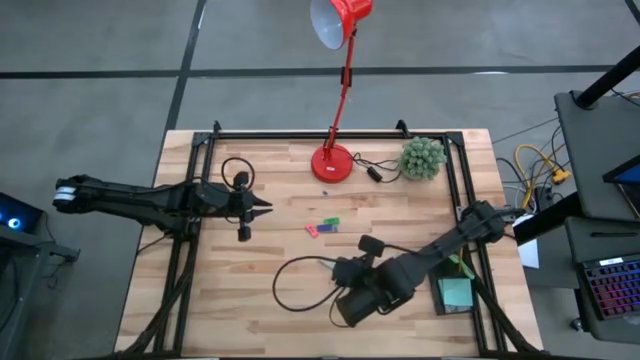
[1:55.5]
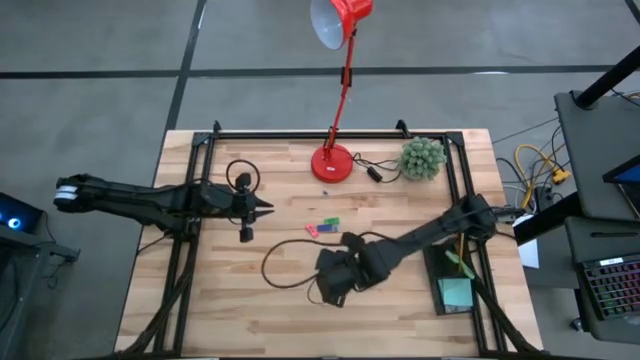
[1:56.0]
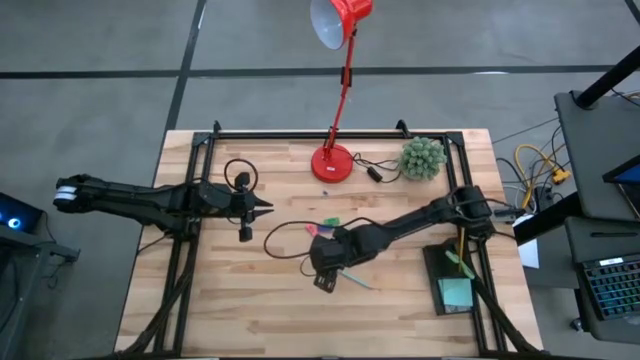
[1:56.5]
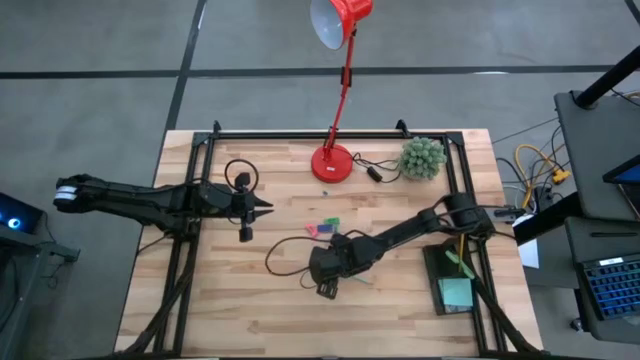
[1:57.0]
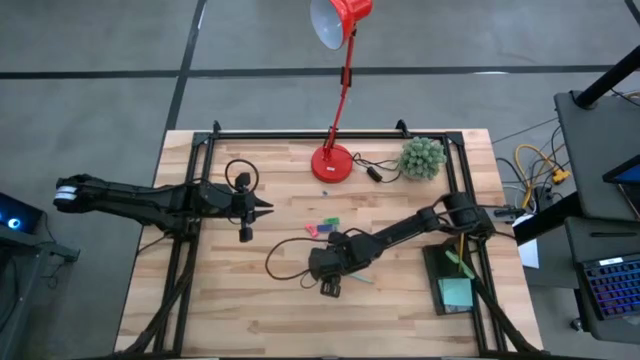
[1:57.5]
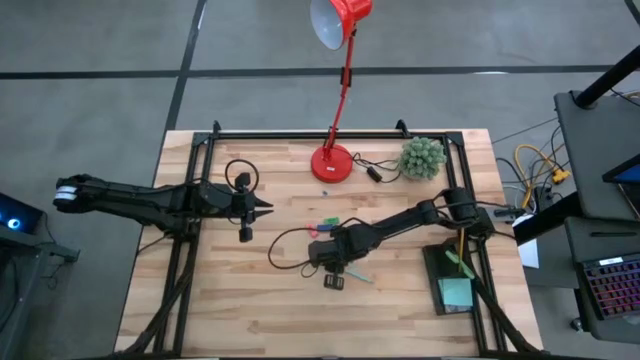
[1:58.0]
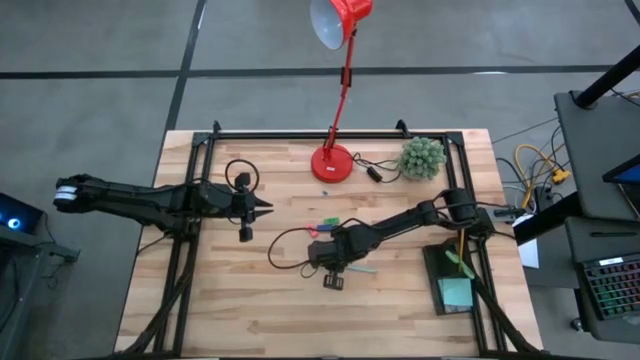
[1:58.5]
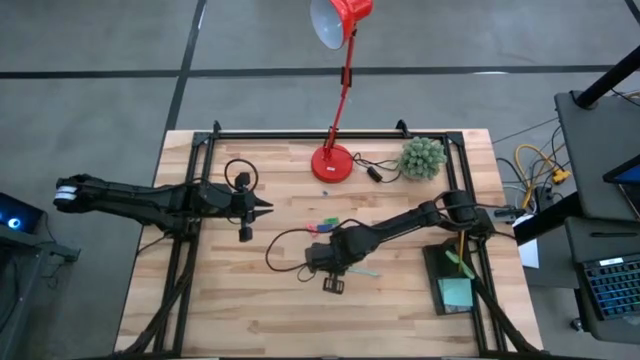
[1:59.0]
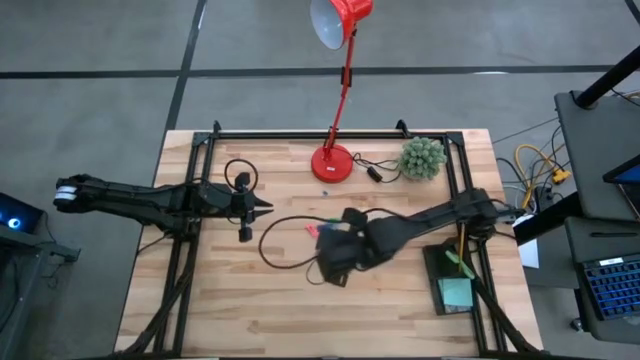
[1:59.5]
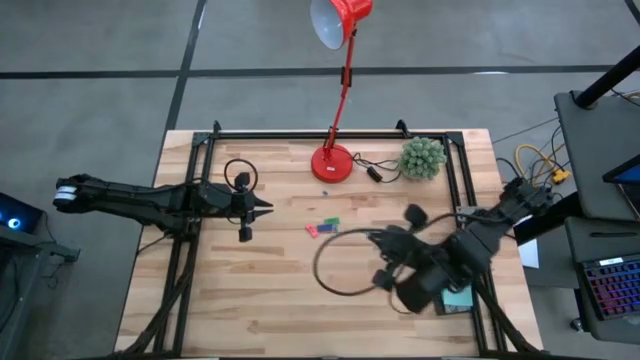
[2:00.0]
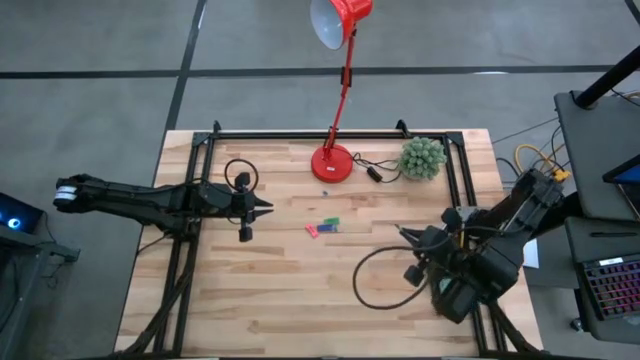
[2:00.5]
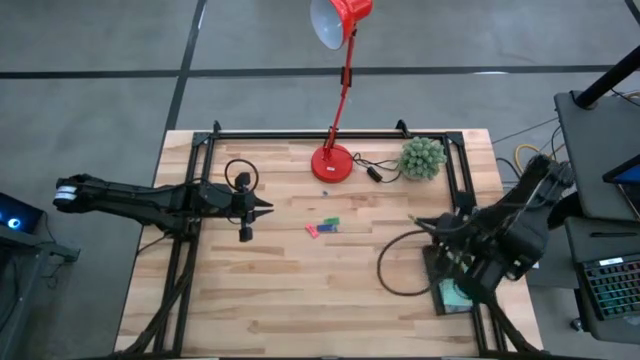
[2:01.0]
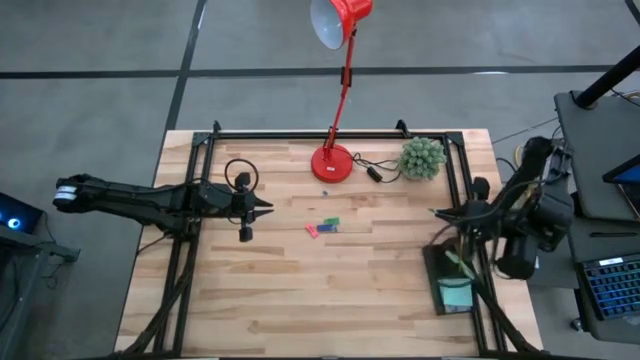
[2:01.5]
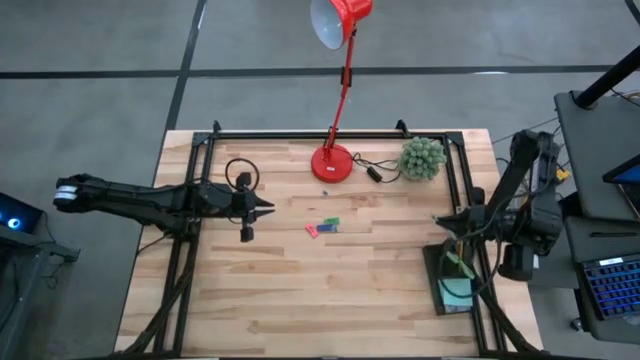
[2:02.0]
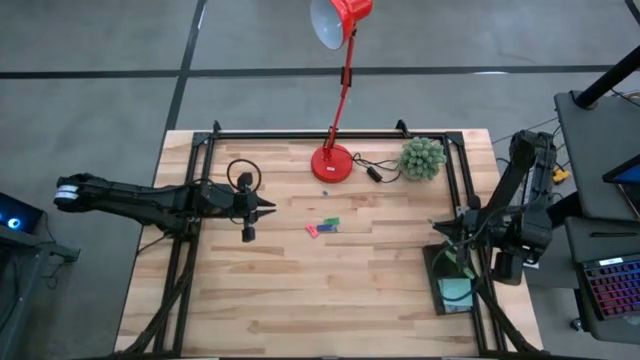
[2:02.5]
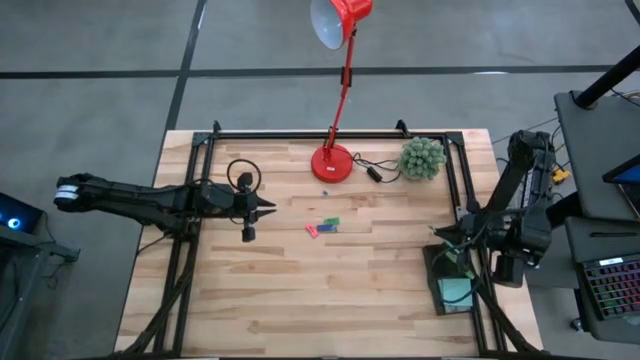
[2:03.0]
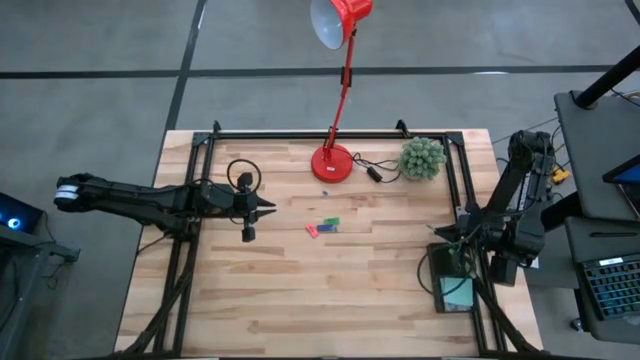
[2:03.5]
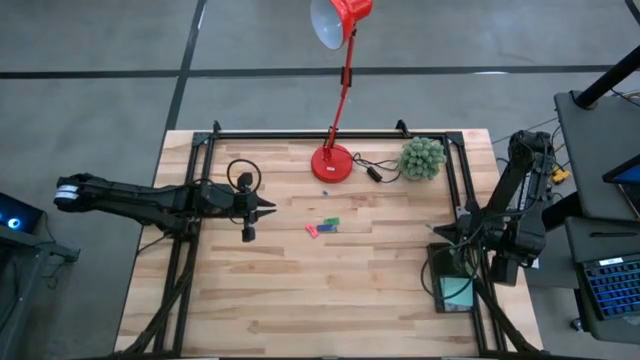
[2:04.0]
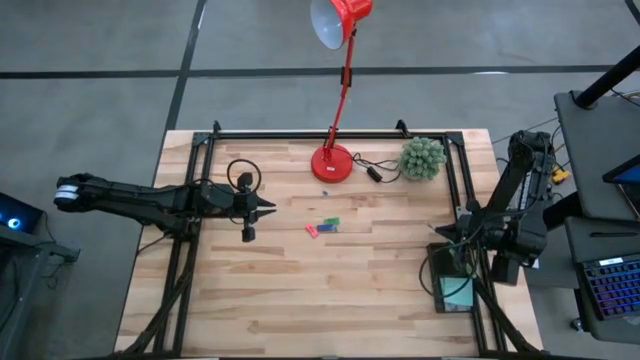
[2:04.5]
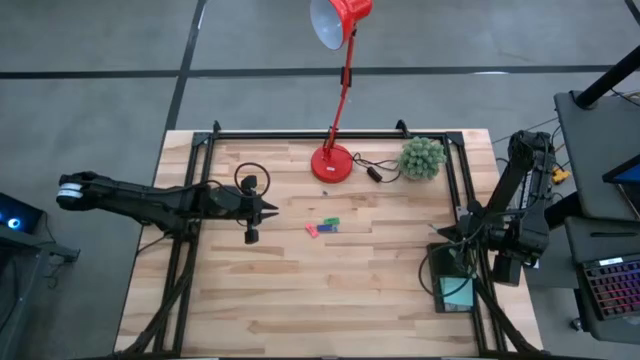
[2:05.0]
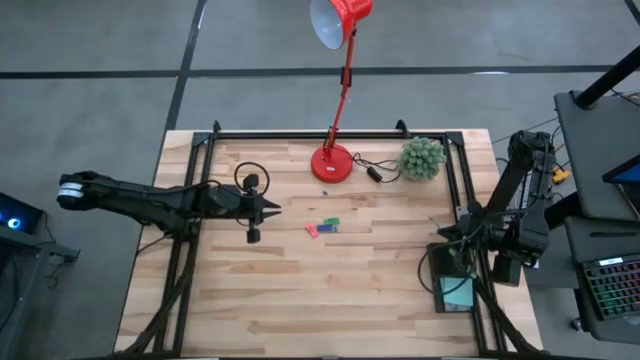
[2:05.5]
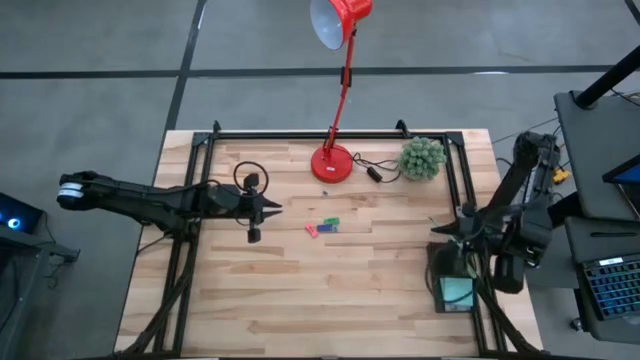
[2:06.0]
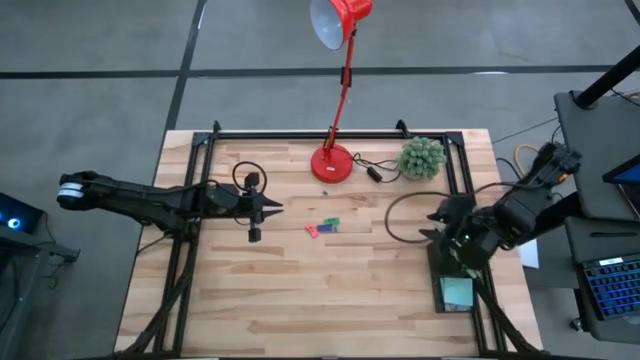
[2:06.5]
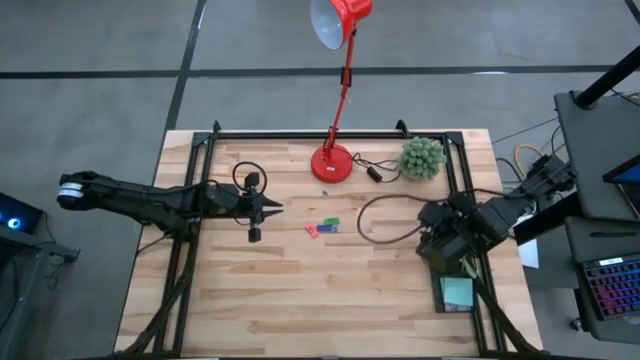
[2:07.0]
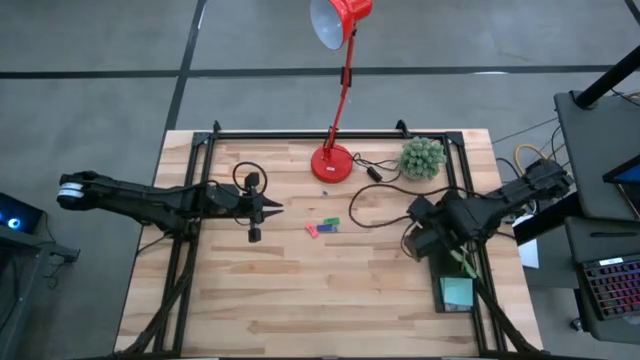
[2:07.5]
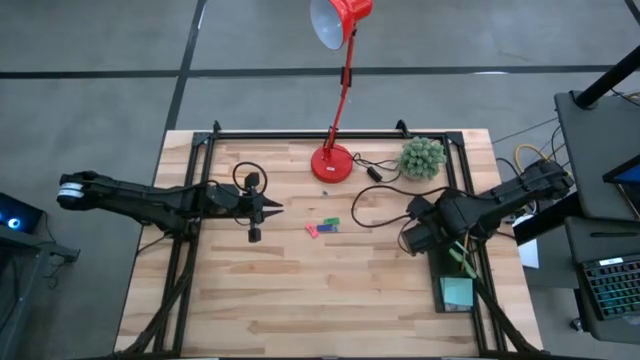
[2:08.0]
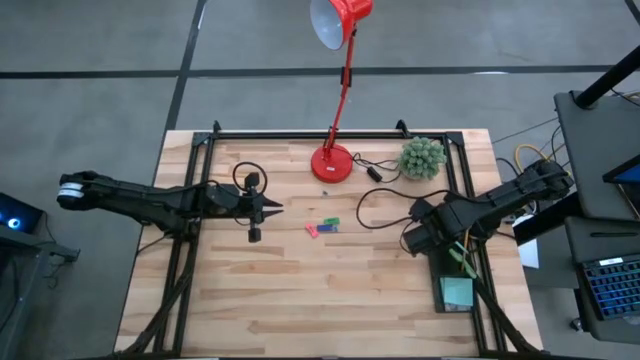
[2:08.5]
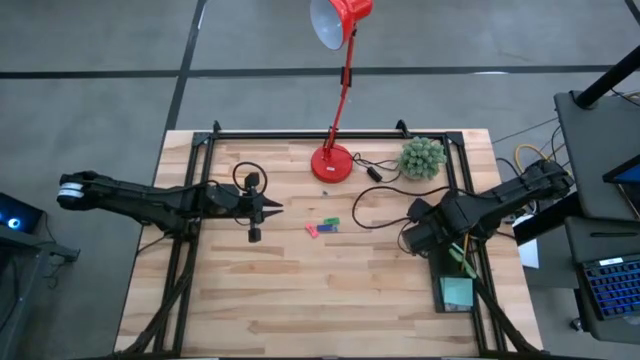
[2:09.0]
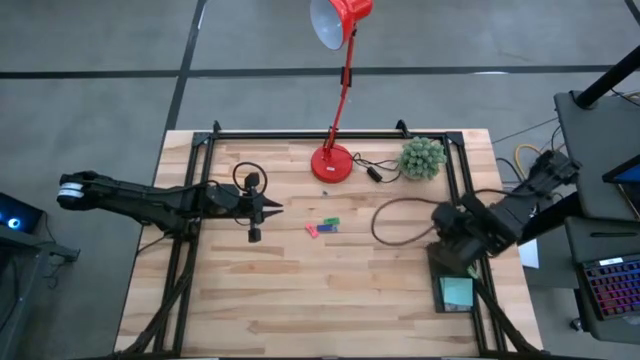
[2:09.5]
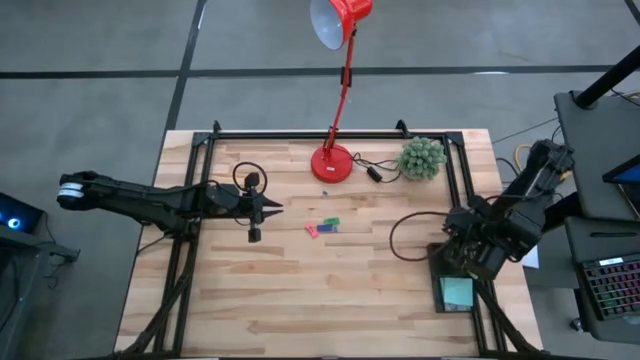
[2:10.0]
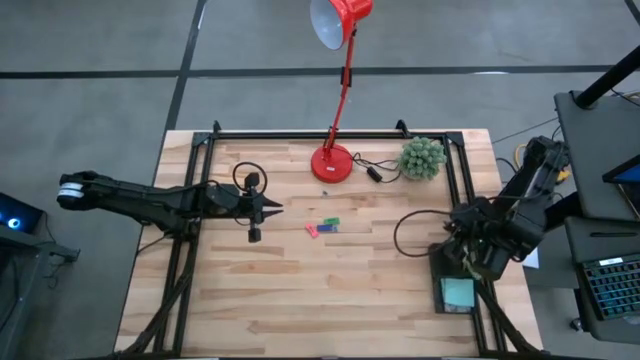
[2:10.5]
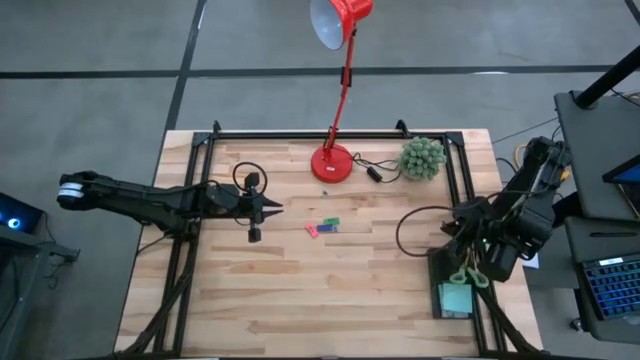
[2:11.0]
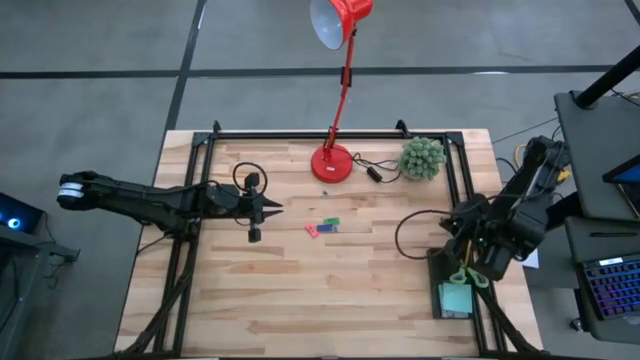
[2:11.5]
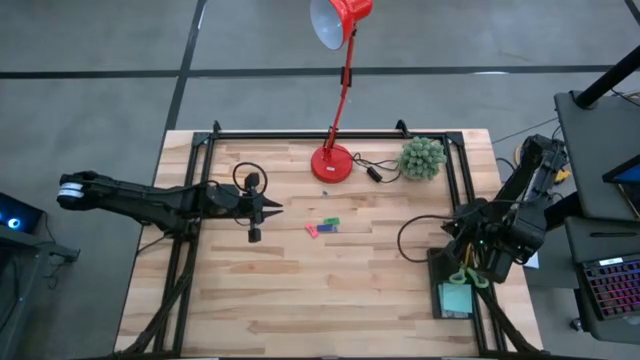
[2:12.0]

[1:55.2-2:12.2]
Task: Pick and place office supplies into organizer
Put the blue pencil into the black desk organizer

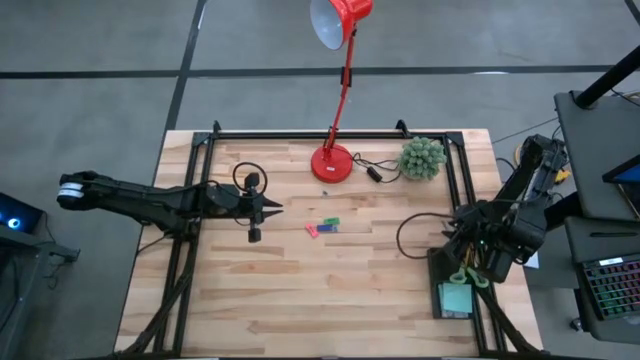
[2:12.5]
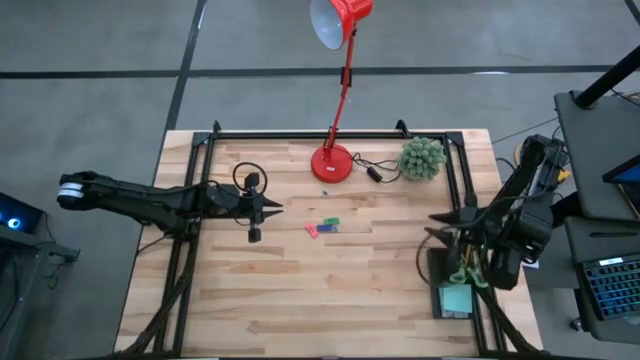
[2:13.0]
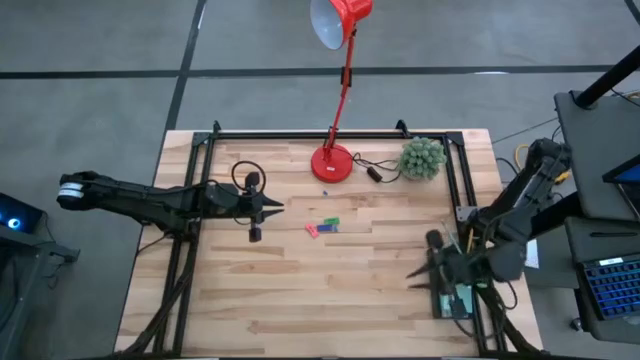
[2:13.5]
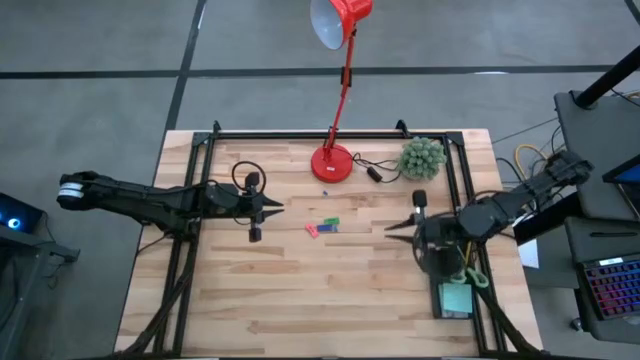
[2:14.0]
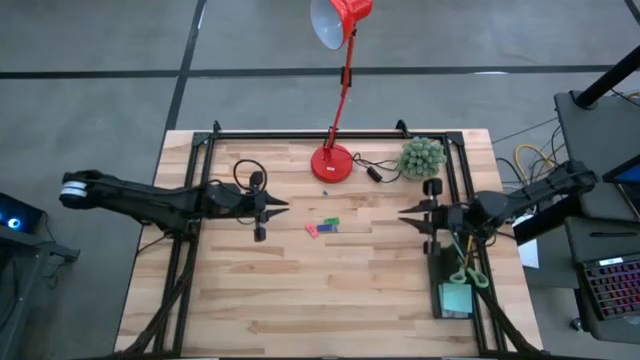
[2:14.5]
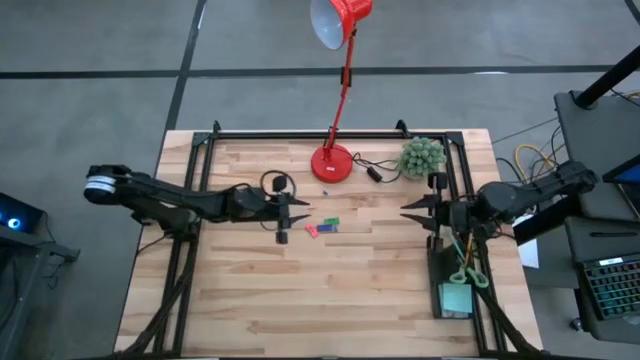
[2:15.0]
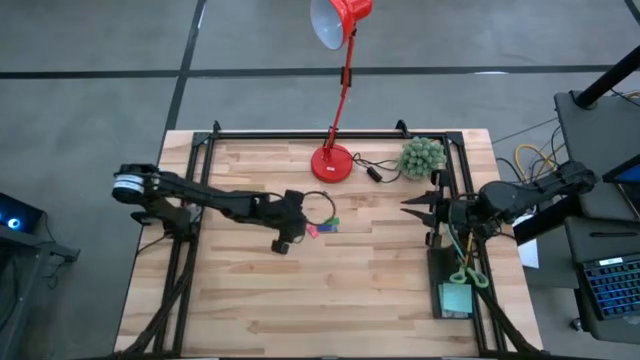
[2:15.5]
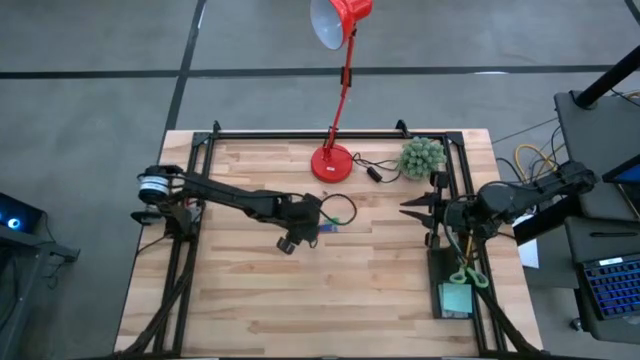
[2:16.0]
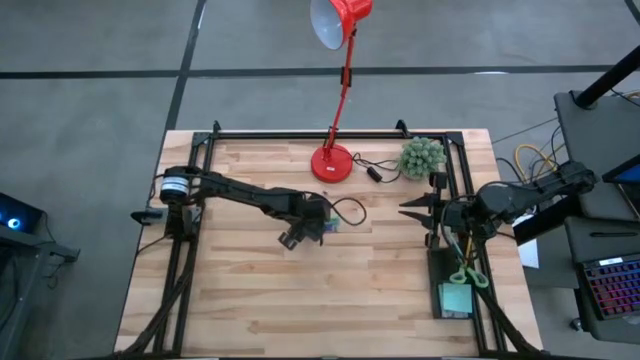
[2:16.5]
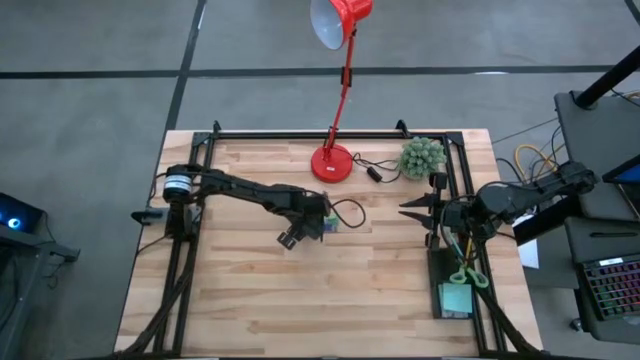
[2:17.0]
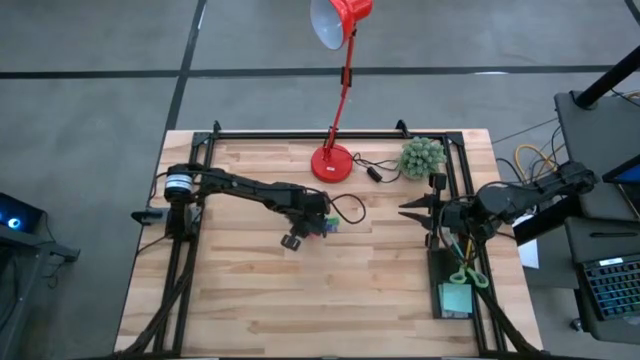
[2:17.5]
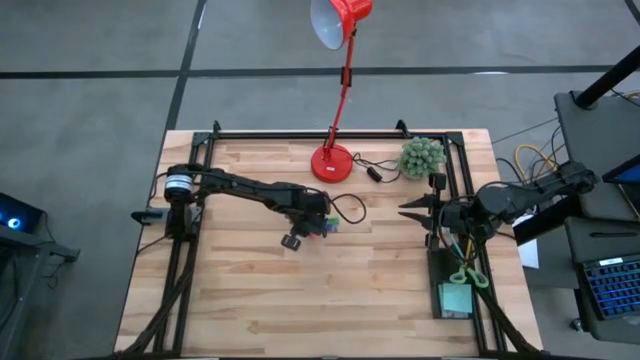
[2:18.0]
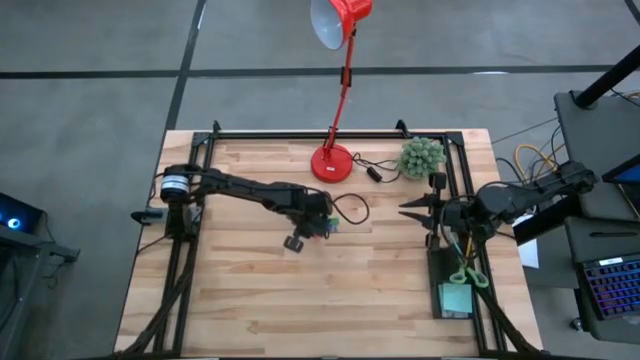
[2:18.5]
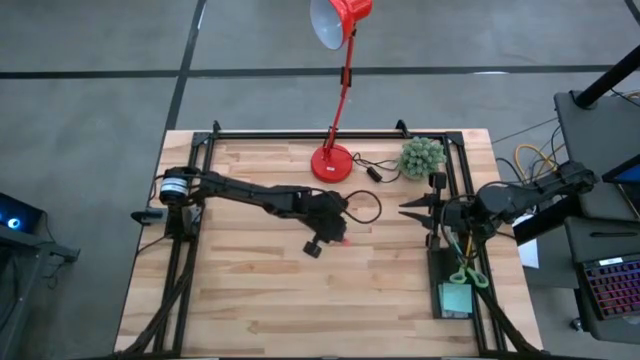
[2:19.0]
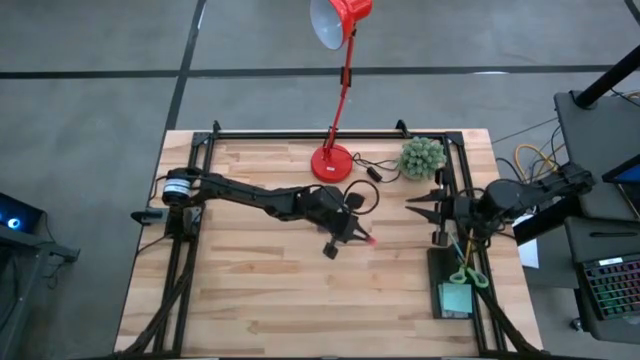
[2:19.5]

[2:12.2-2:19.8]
Put the pink eraser into the black desk organizer
